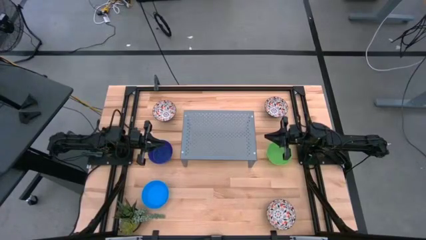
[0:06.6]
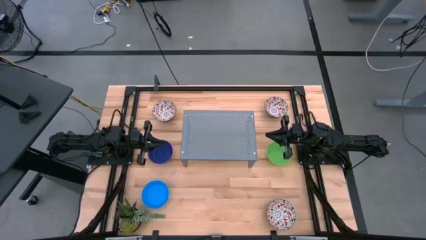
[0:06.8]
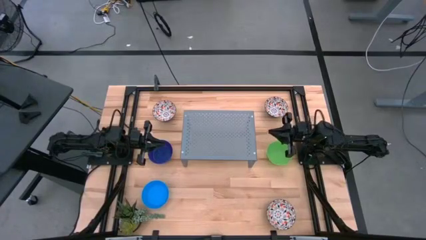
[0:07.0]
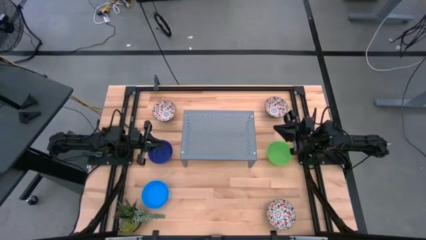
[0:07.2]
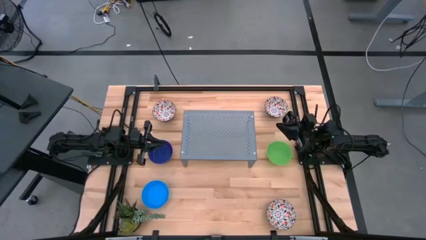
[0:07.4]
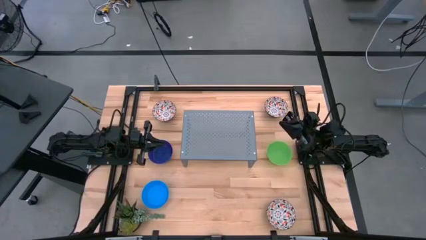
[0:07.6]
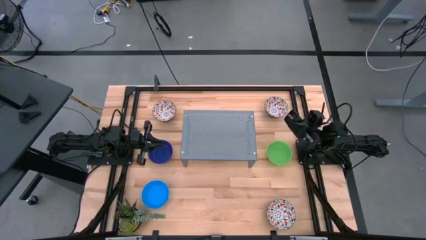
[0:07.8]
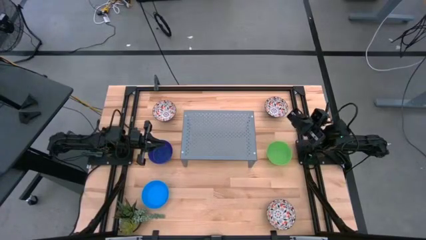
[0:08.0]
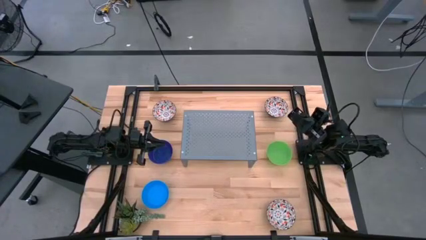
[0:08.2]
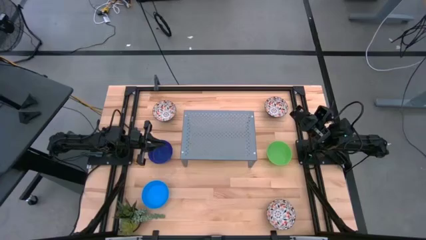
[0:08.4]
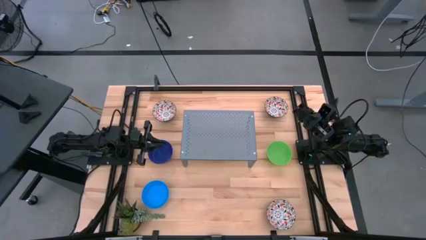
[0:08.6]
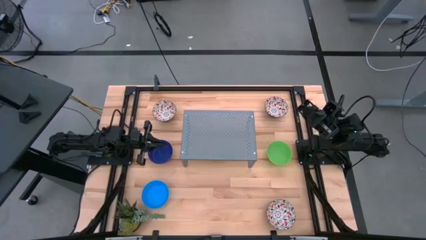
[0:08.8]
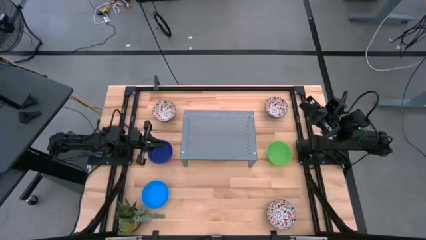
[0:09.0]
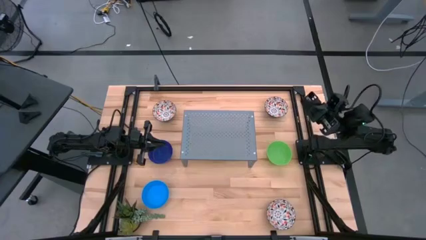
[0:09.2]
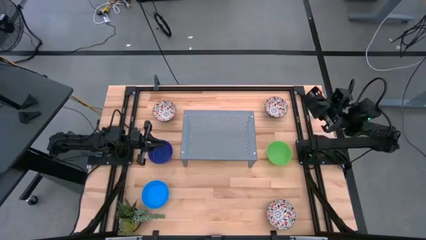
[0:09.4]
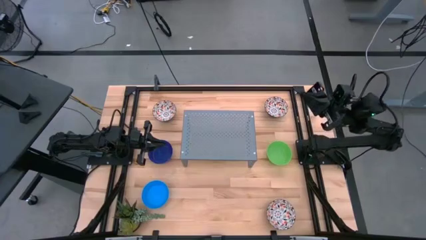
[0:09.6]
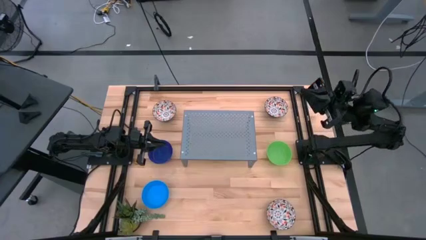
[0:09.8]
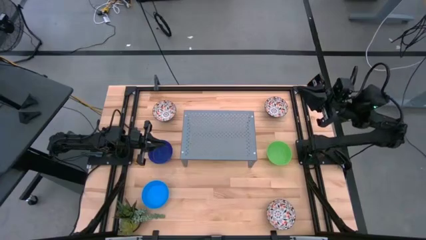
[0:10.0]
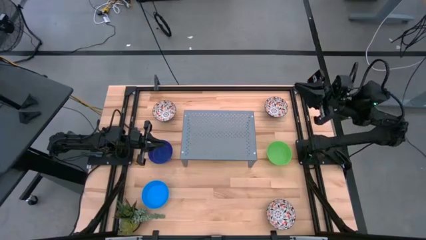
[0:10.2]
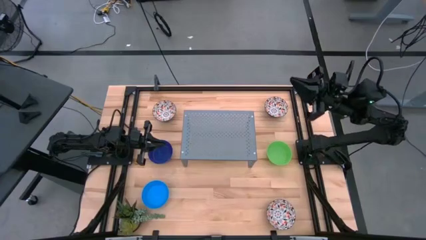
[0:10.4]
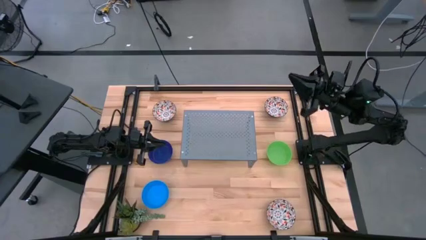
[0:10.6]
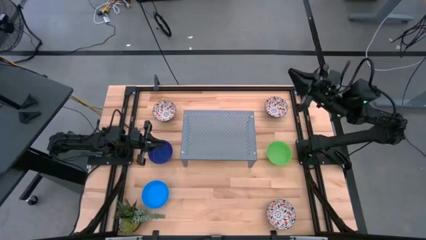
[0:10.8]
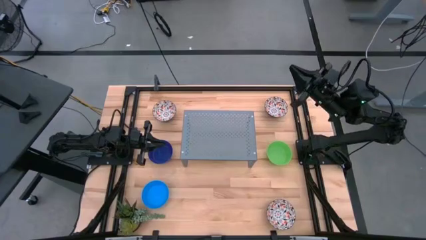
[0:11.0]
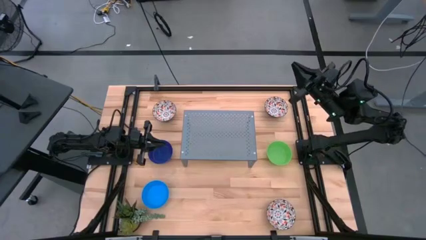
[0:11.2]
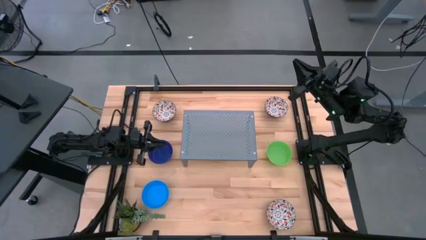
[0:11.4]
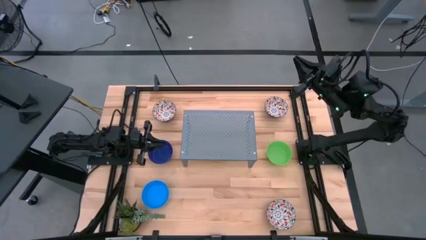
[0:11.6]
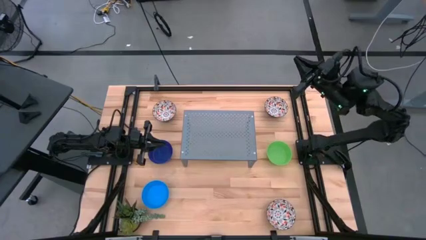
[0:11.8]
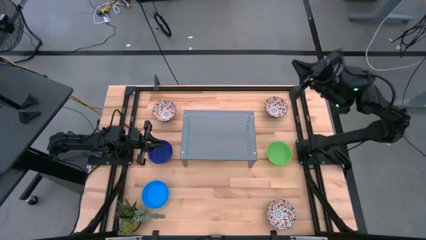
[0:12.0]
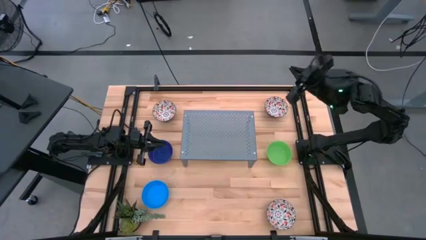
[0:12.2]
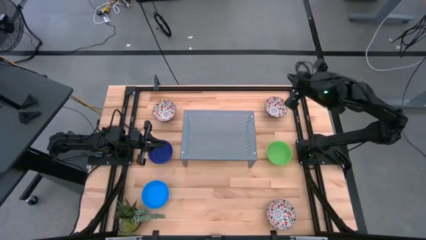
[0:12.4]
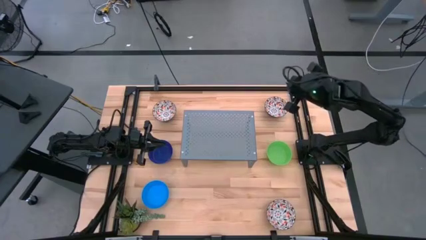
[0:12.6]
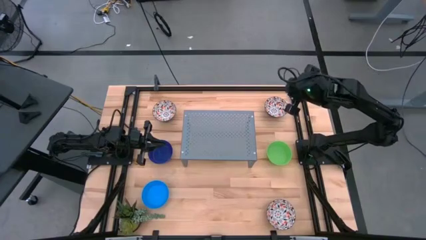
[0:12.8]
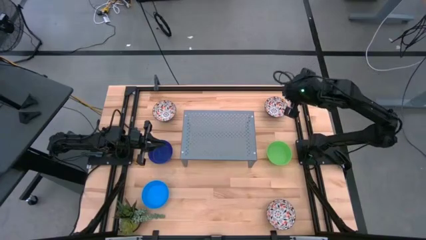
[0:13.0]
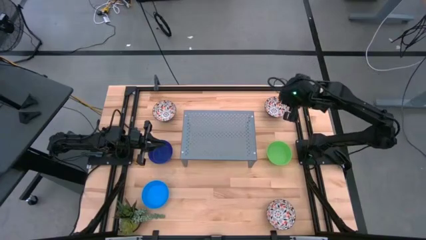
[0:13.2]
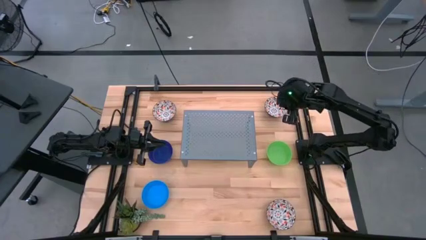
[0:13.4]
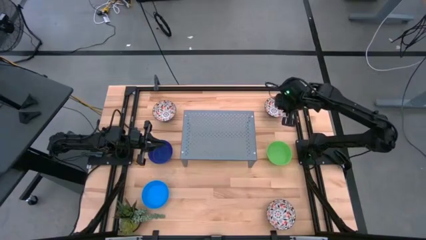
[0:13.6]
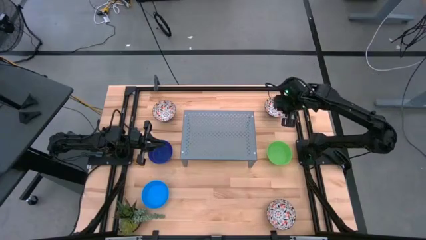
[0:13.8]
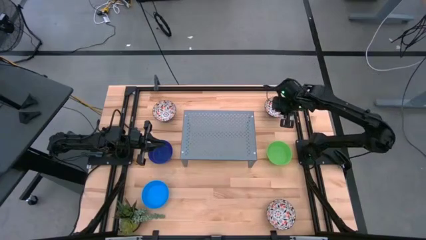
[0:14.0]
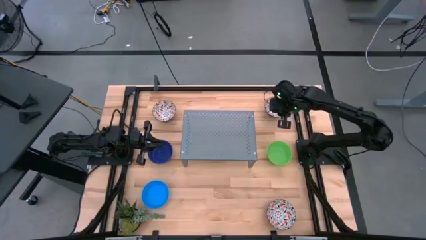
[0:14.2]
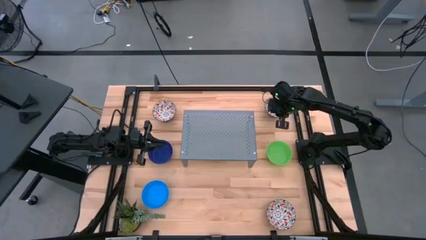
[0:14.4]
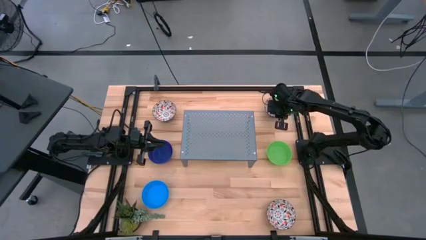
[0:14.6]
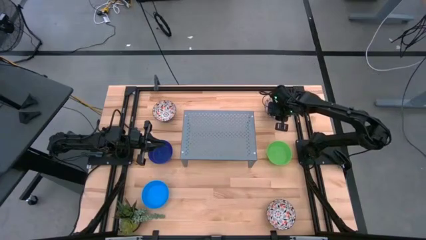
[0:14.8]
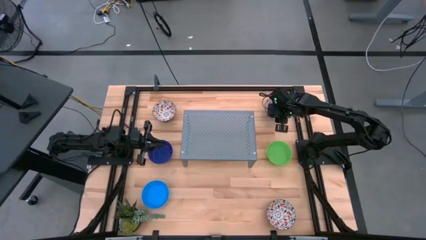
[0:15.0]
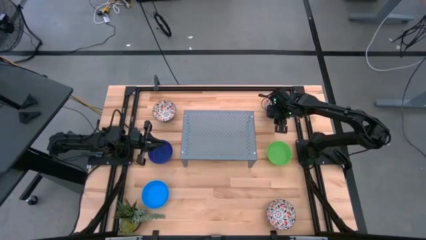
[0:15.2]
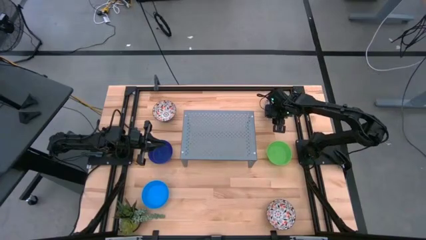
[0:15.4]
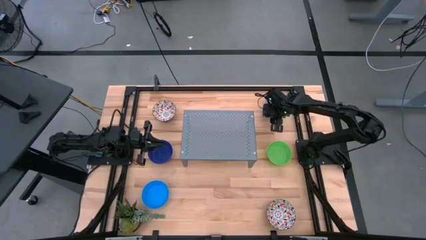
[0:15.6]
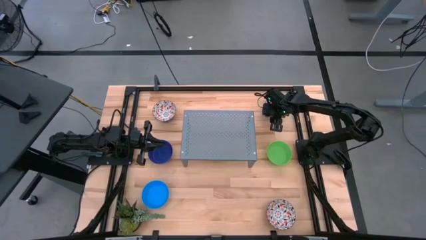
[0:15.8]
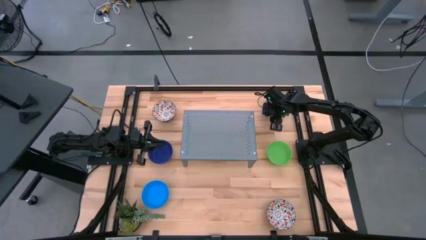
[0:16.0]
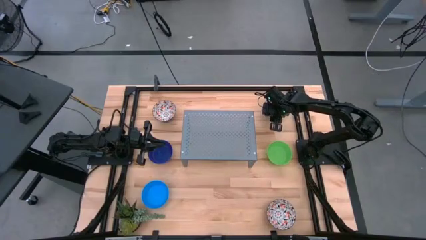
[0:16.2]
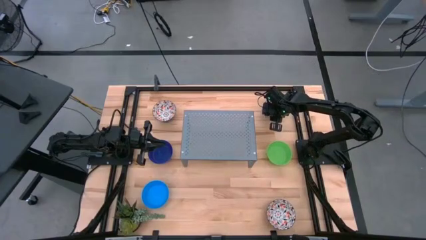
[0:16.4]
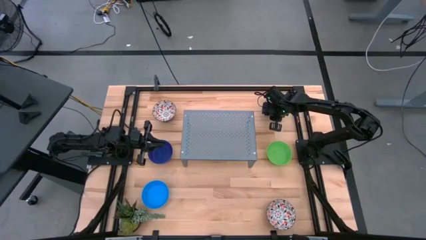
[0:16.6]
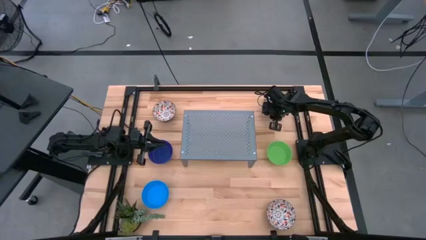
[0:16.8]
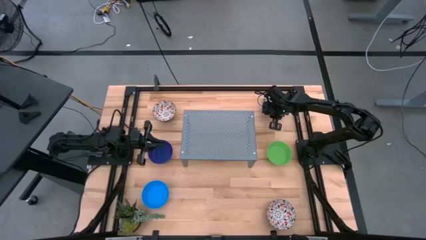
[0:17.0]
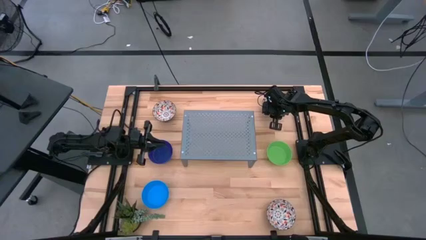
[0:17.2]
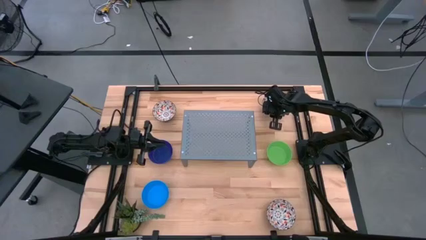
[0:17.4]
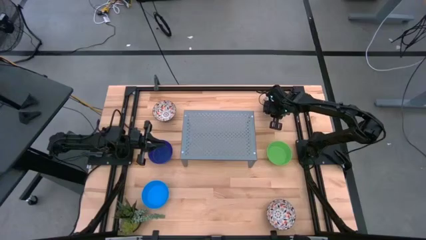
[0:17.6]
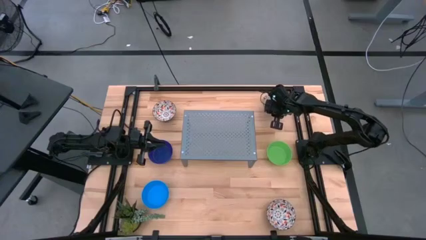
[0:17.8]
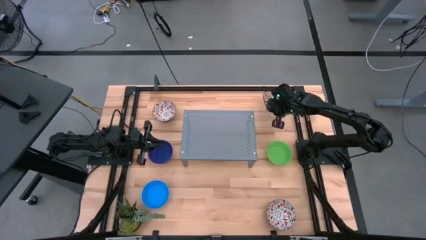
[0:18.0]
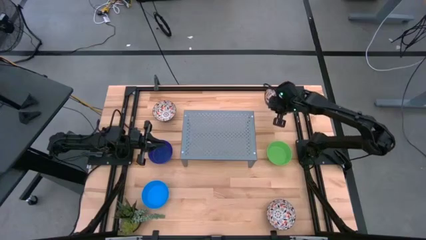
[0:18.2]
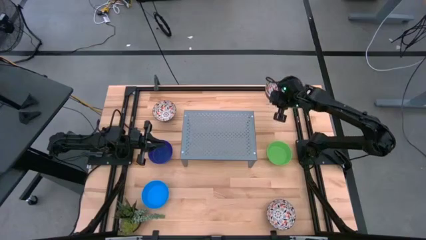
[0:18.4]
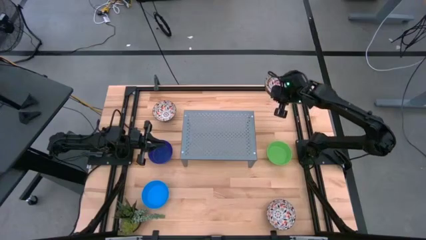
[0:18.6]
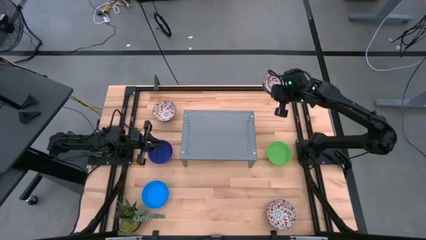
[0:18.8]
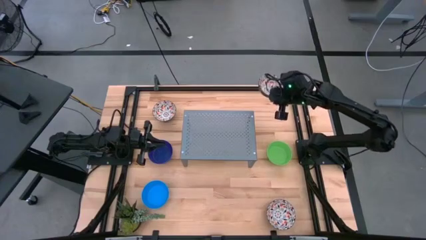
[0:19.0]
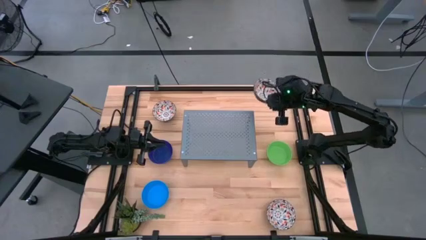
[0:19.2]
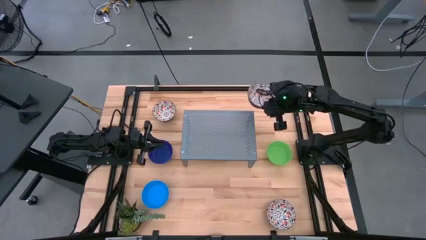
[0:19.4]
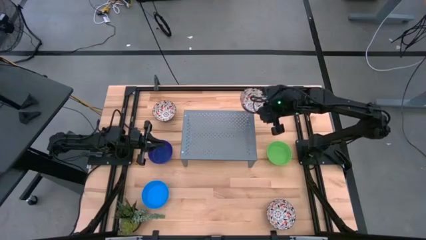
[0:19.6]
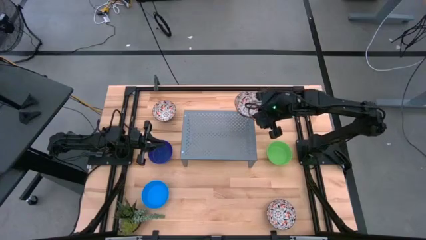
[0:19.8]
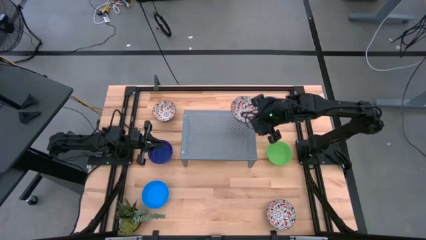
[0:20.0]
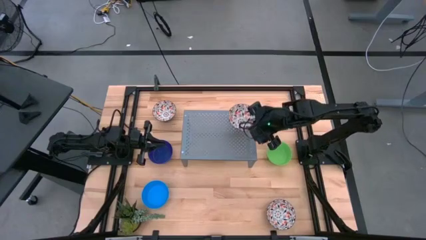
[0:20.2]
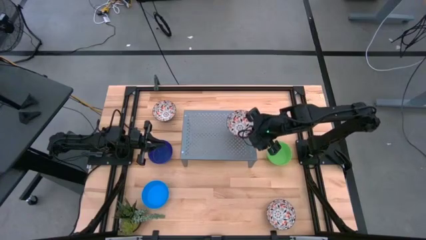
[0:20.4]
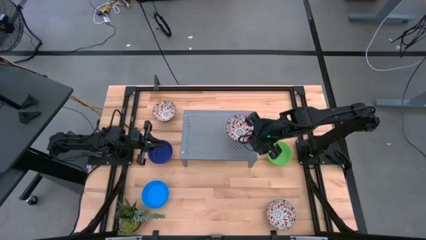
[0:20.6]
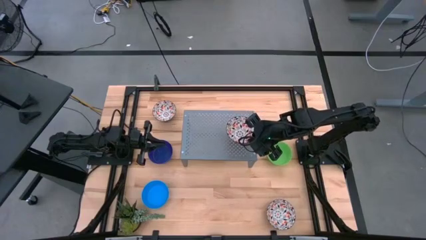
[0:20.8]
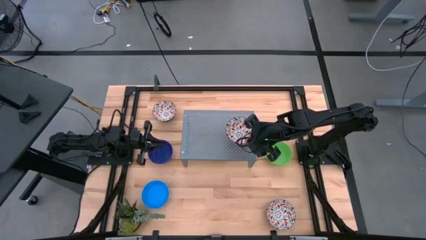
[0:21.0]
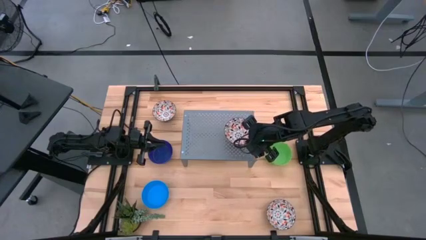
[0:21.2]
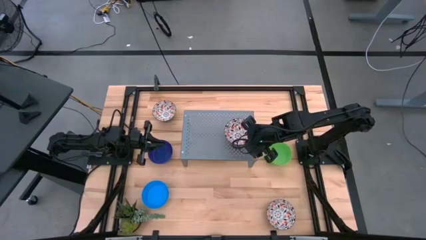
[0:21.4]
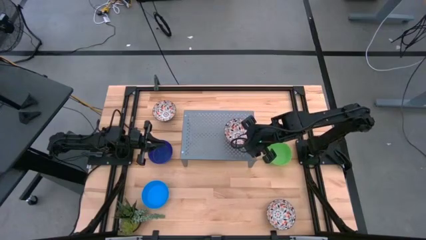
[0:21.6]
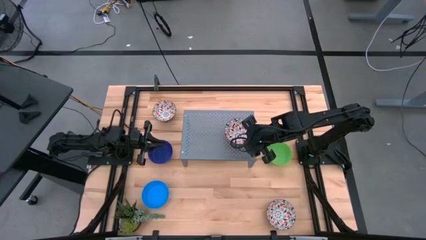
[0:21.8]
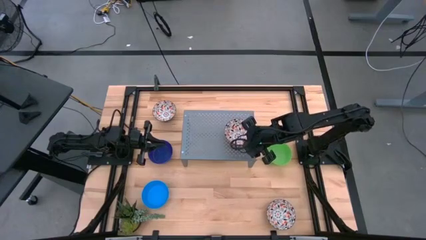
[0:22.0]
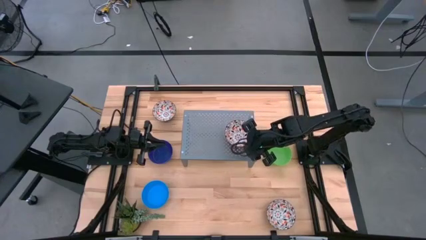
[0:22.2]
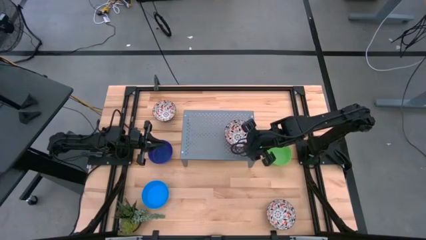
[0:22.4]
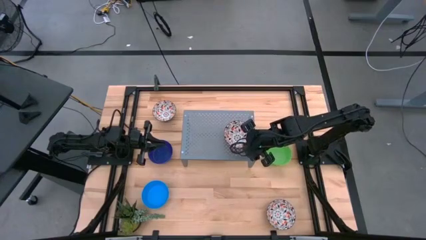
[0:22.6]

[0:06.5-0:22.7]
Task: Pick & Place Mini bowls
Put the top right white patterned bowl on the shelf
